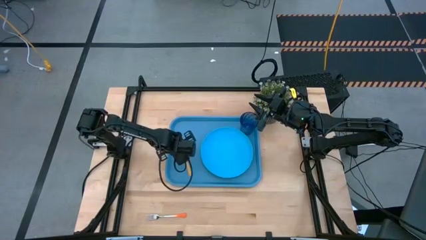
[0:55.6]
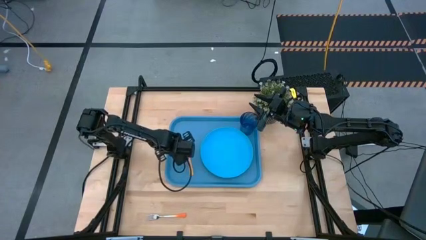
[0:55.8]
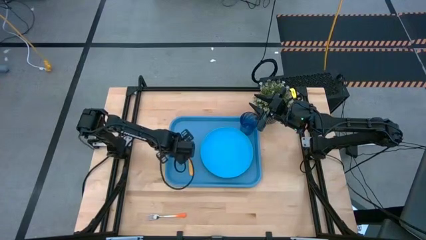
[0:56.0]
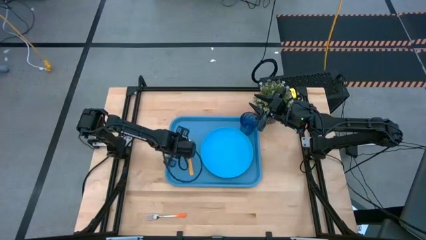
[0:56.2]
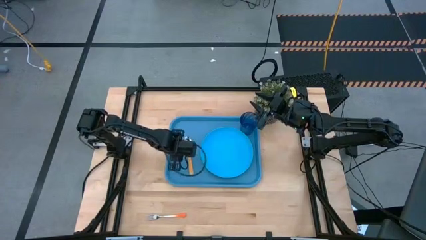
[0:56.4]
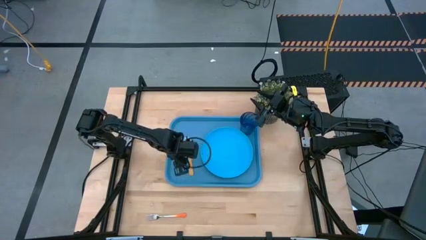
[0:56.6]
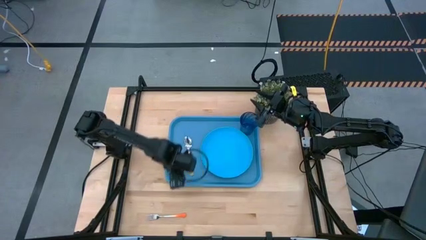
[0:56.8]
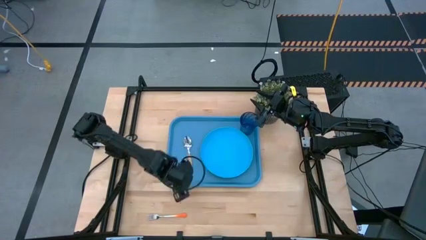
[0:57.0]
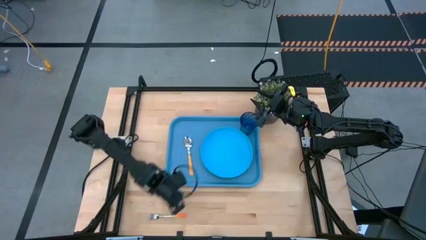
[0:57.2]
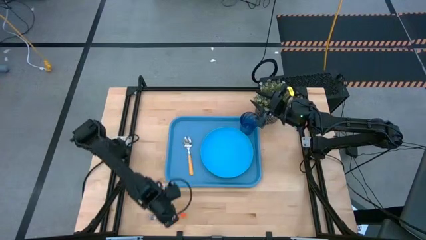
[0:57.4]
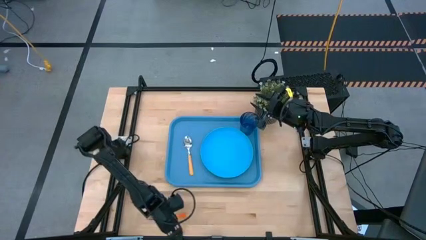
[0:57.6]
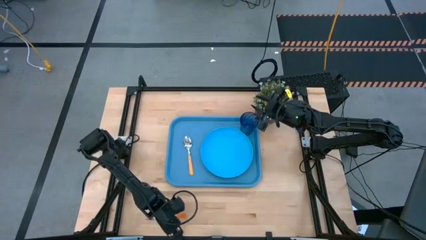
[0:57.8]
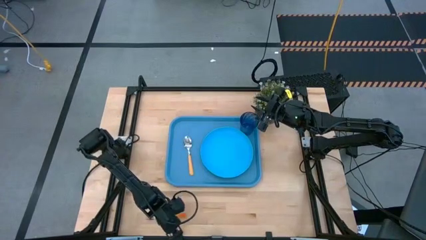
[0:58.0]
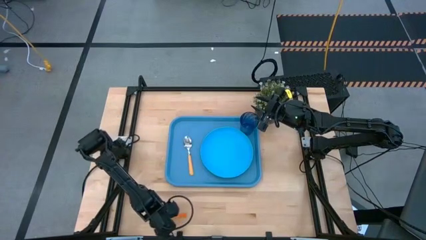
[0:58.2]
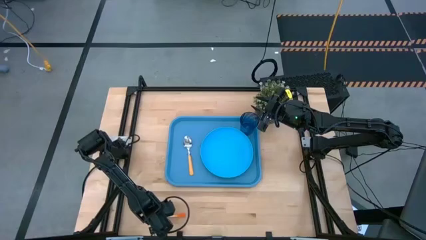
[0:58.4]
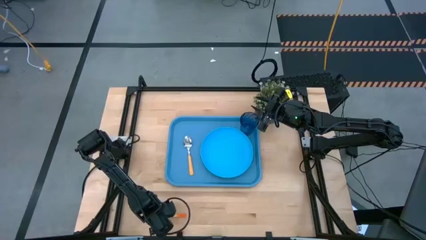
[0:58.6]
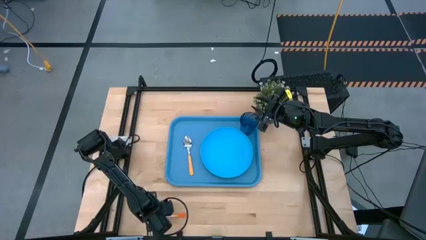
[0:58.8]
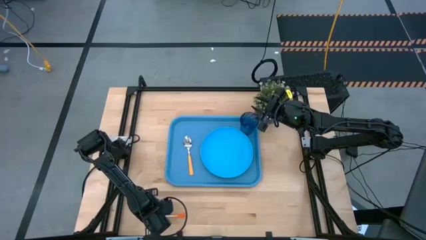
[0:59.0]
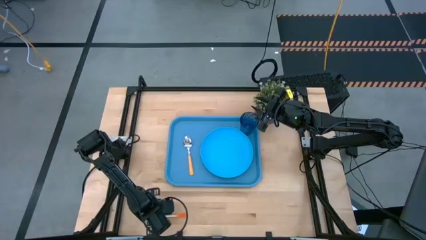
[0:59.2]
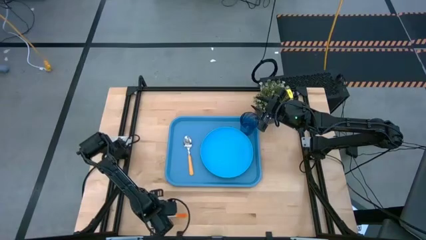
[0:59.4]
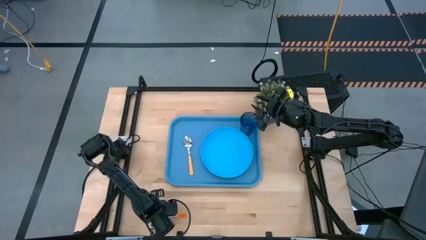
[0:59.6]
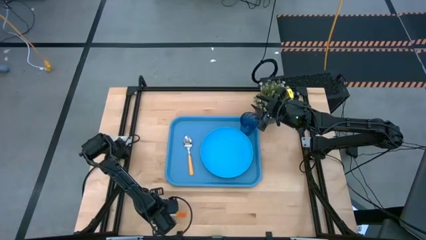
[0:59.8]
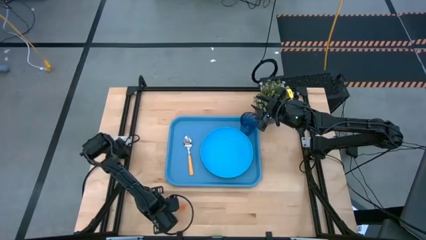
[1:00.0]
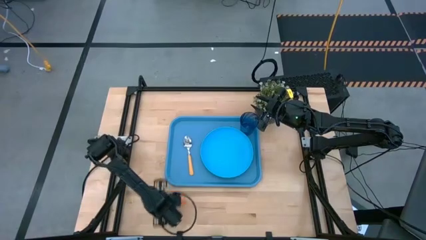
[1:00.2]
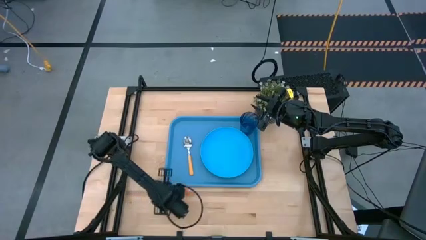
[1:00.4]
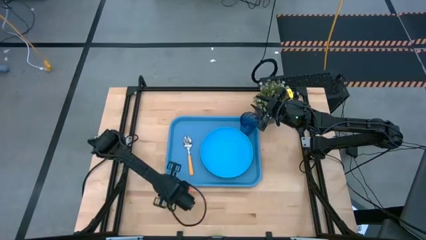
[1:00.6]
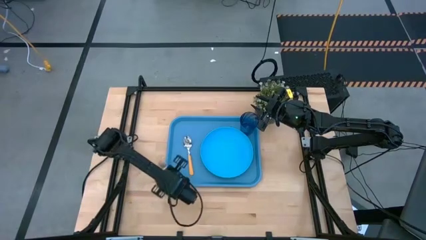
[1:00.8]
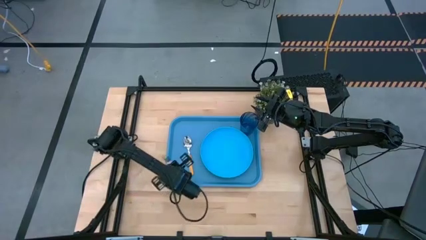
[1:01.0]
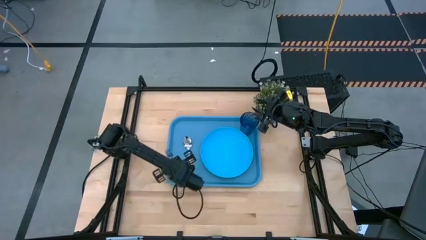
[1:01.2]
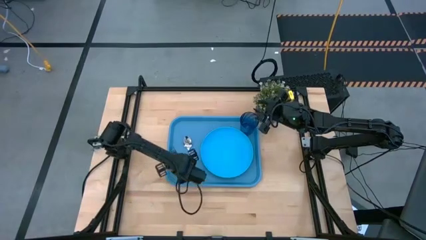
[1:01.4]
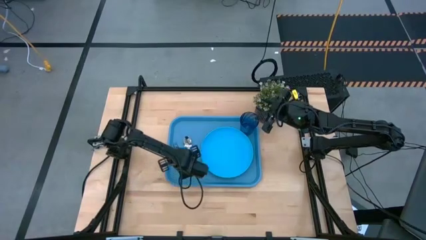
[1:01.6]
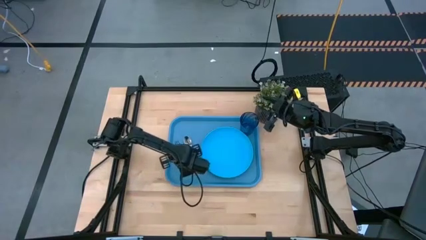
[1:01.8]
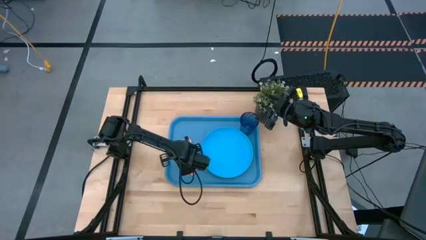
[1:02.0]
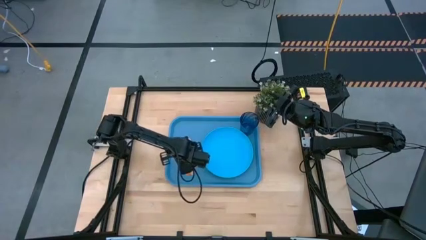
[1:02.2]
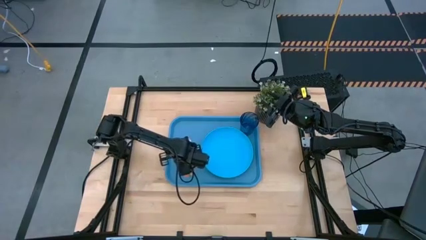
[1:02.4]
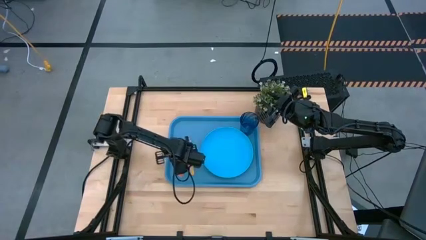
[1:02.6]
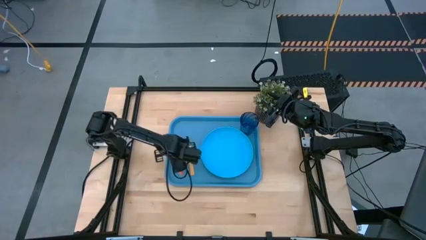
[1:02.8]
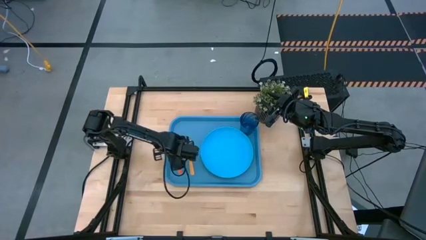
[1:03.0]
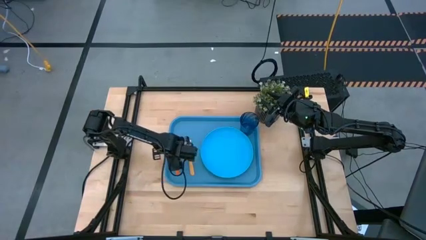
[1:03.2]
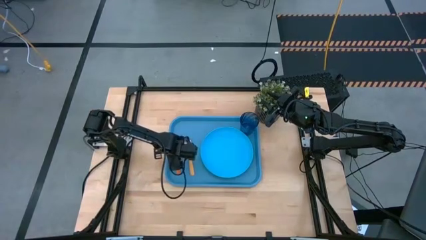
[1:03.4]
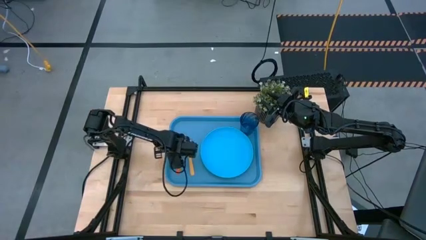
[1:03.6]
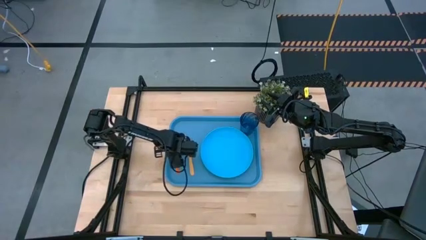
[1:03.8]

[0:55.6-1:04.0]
Task: Pick and place plate/cup/fork/spoon on tray
Put the orange fork on the blue tray to the left of the yellow spoon

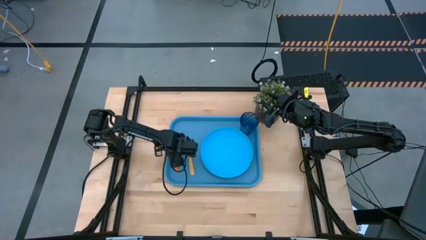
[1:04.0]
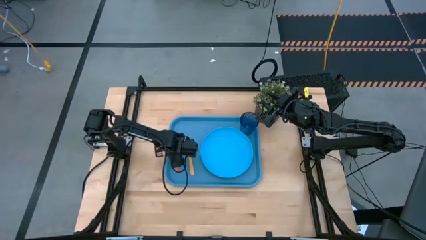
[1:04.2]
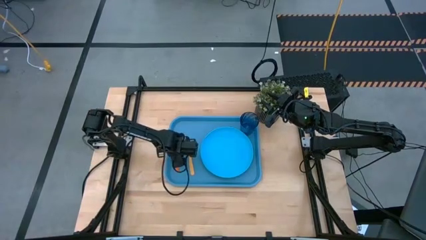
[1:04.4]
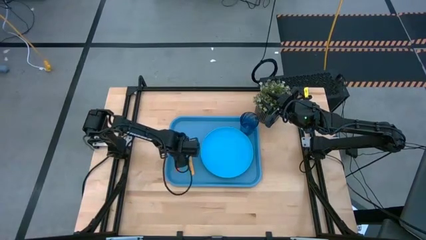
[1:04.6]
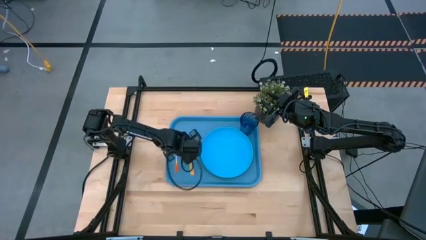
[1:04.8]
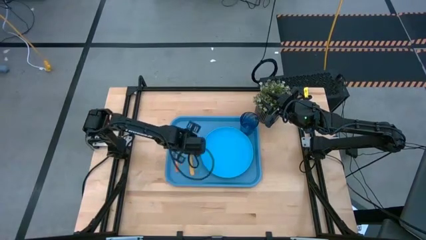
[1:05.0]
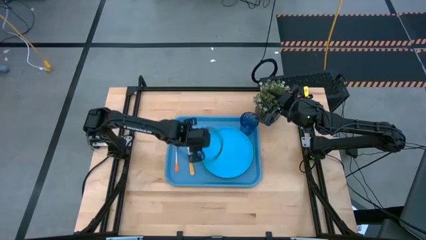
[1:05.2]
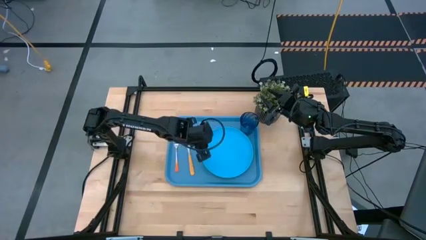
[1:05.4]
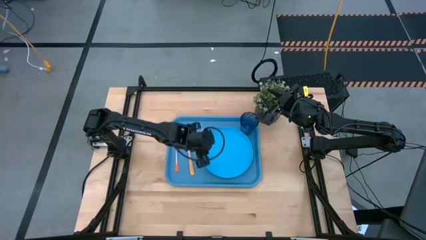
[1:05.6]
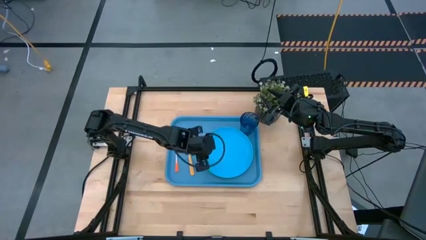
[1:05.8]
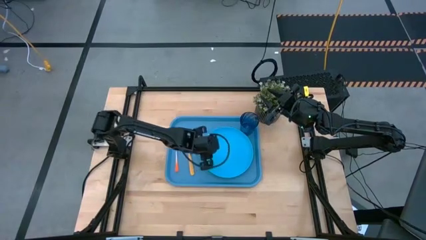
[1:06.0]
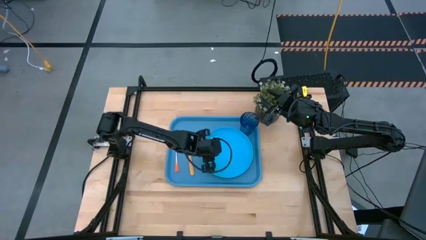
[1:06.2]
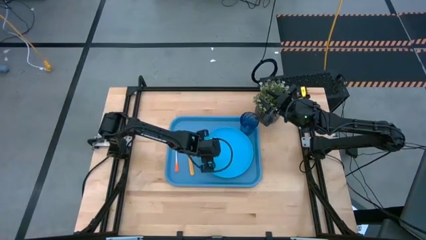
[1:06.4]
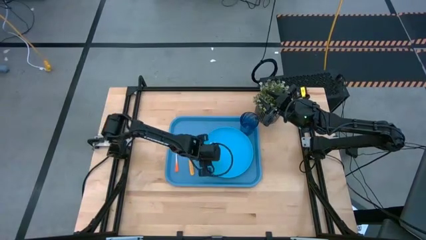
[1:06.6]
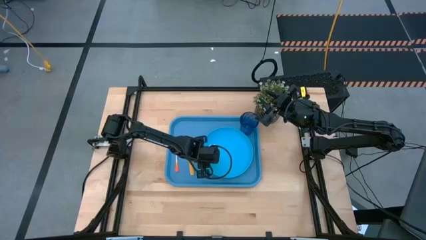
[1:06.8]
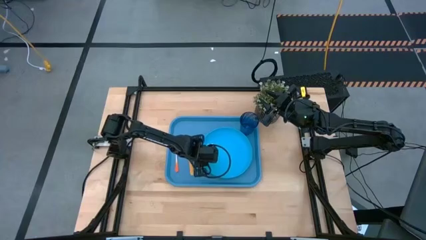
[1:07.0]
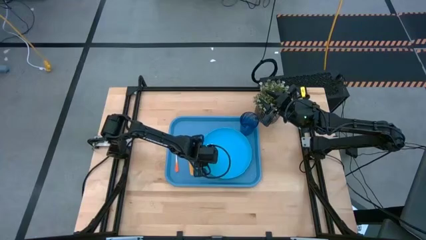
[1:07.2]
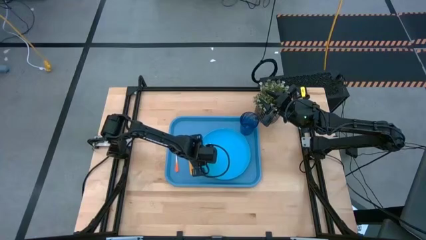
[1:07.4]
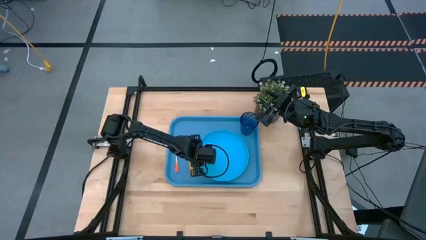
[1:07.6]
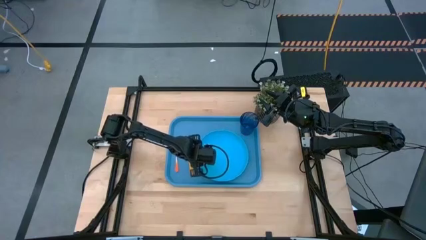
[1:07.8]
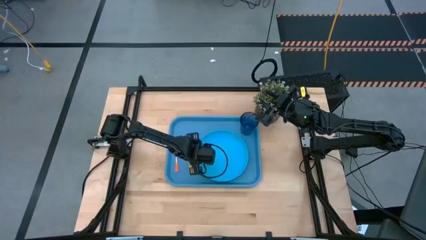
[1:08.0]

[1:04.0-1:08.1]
Adjust the blue plate
